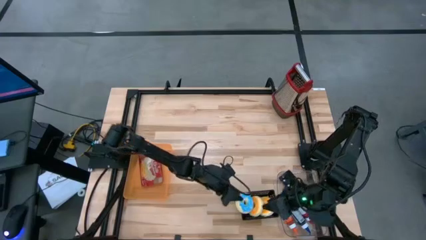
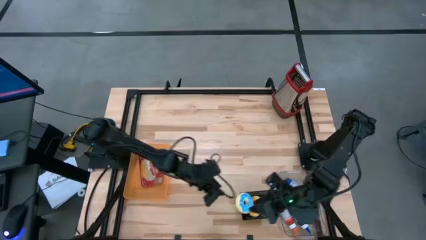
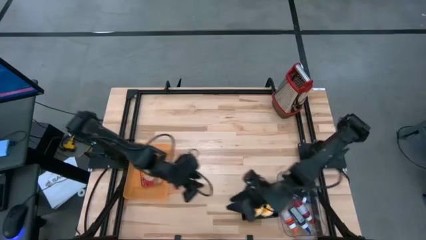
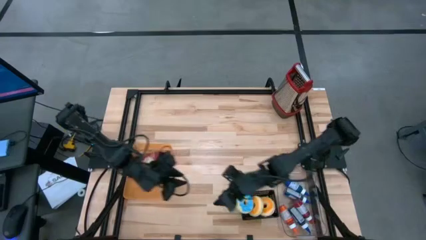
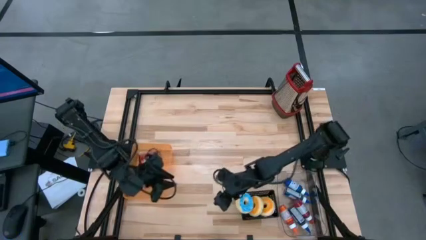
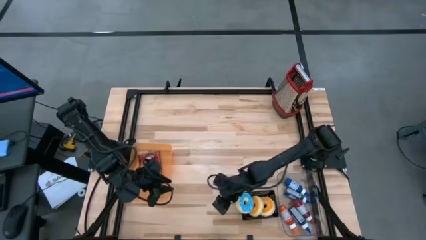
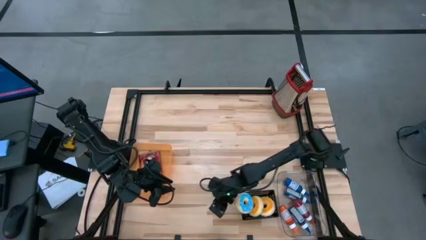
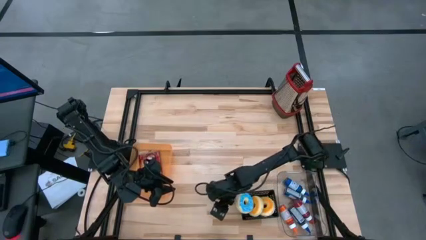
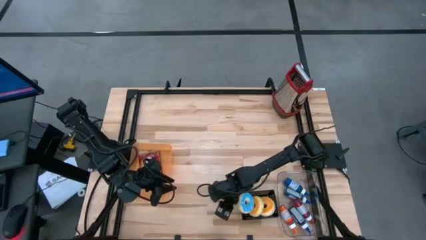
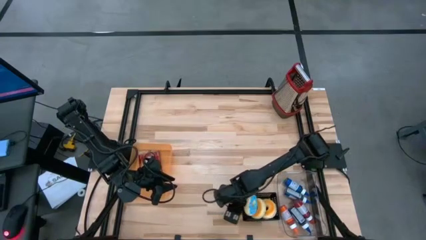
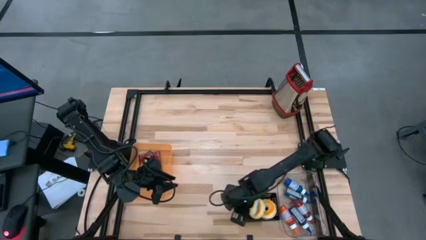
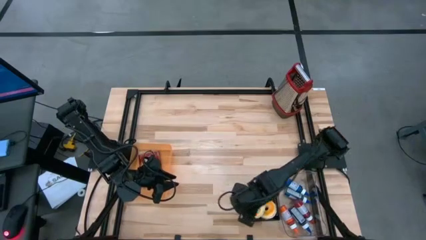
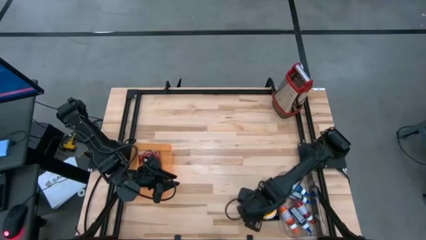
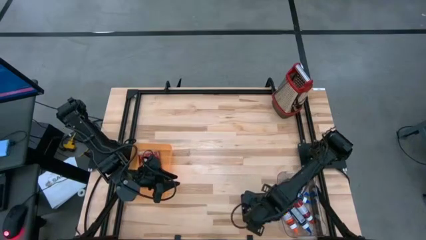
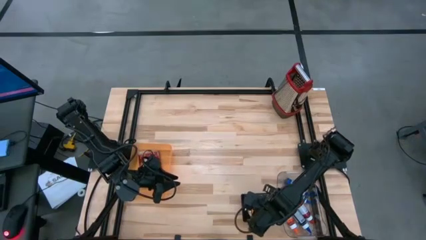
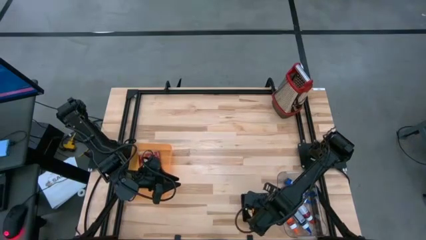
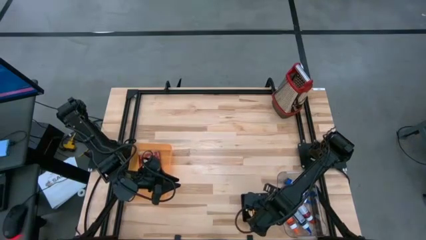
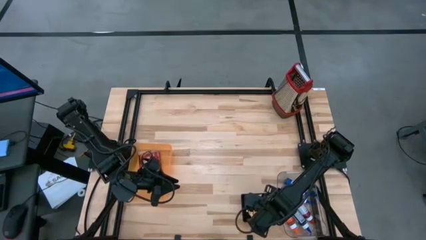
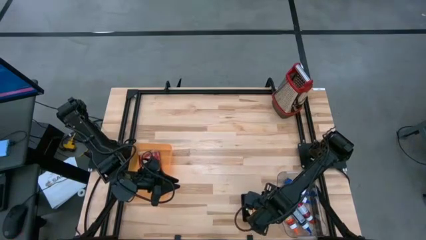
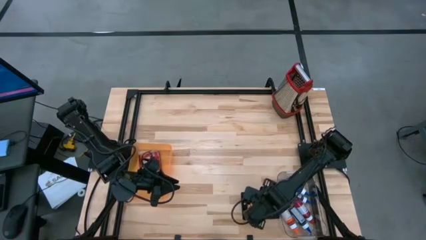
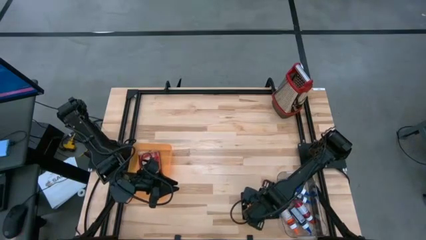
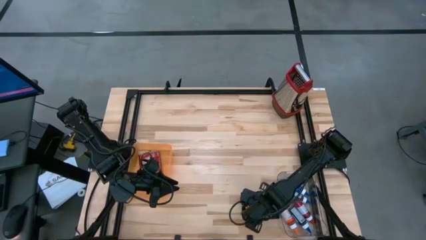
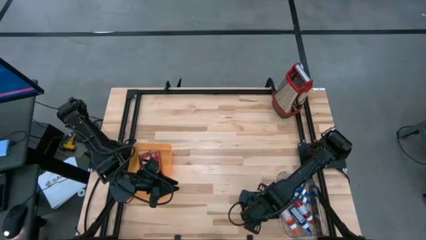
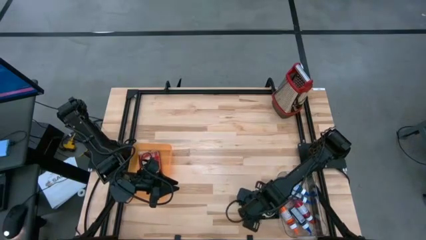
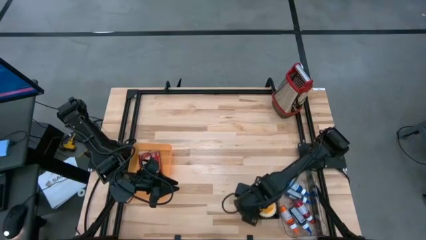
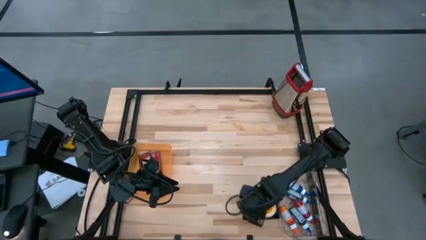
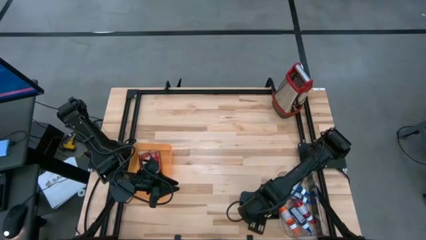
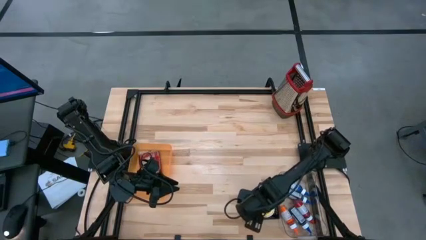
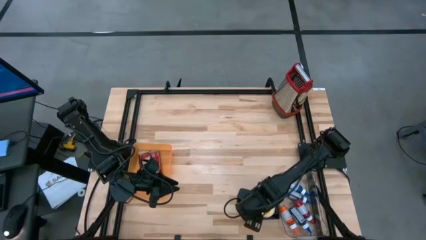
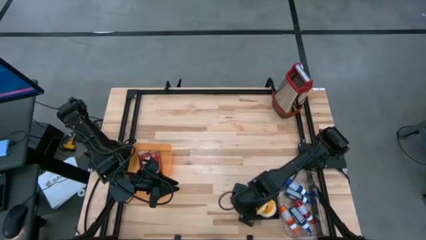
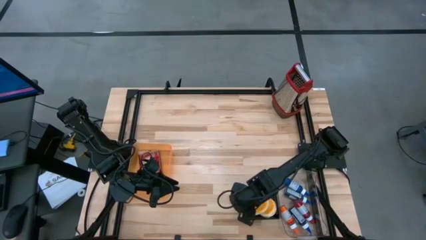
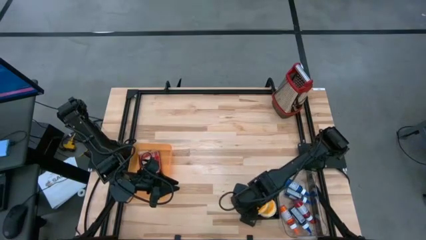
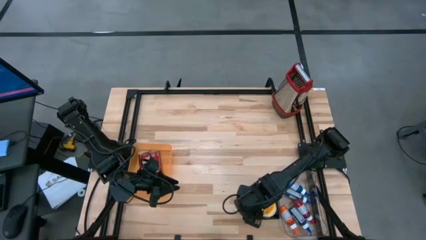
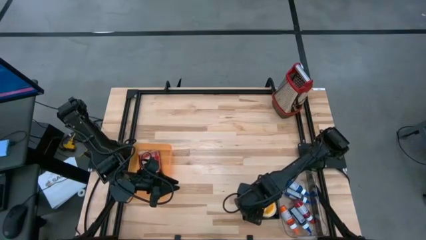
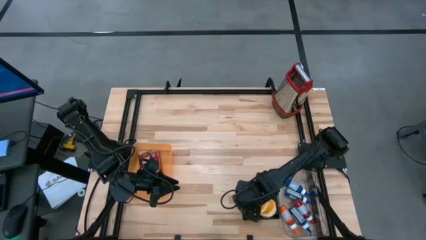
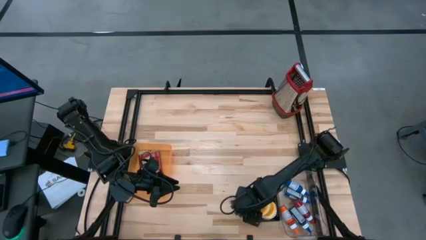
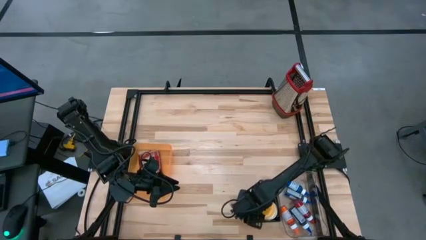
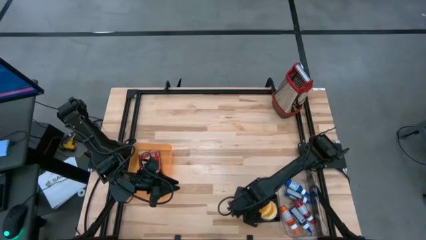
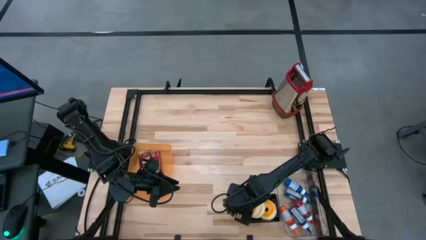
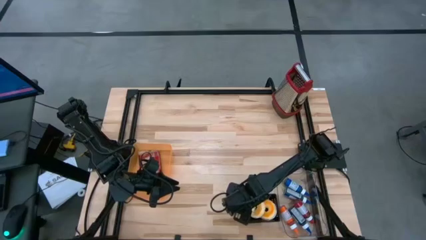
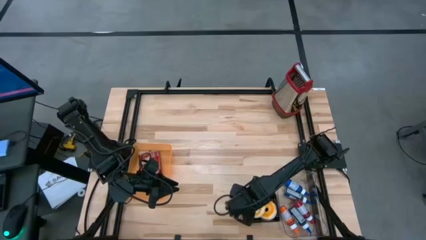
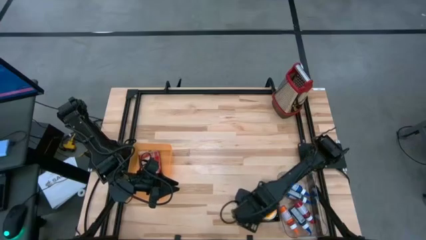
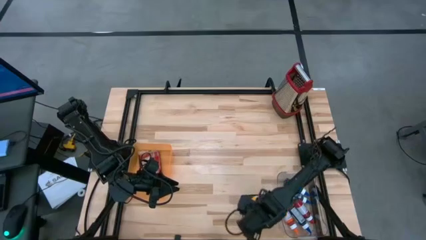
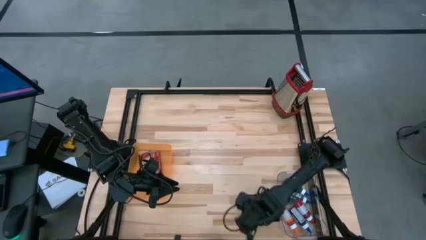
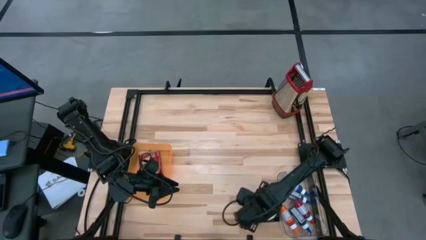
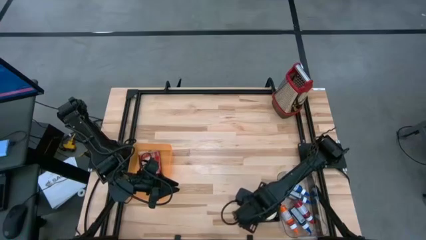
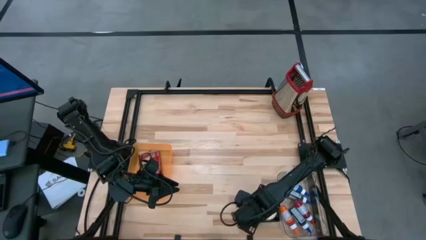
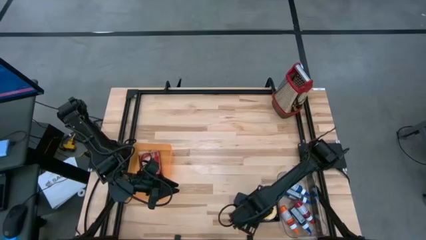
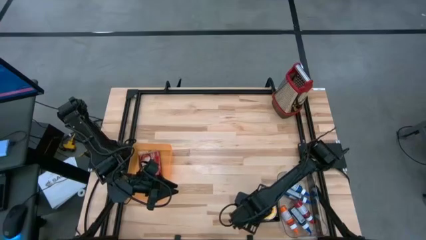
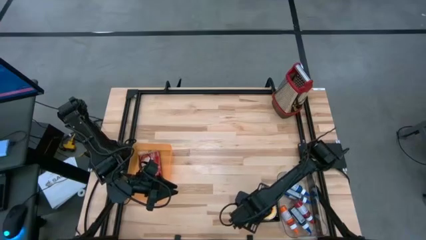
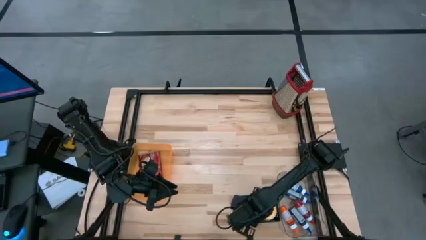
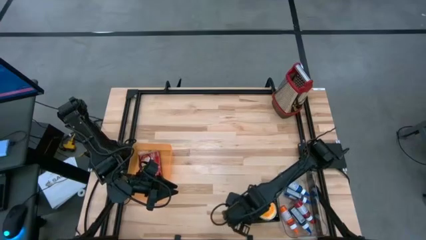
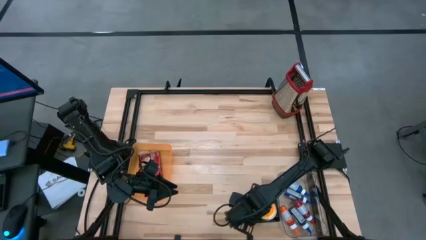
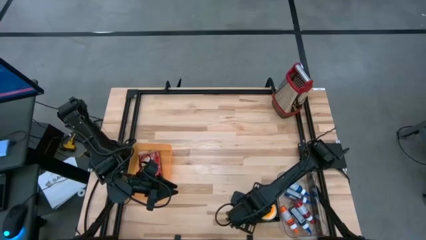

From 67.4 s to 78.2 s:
Task: Pick & Place Food Item
Put the blue donut into the black bin

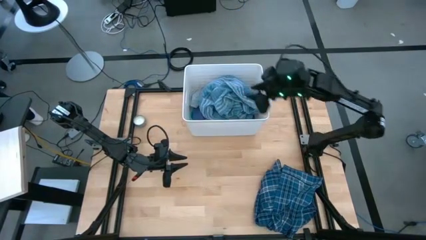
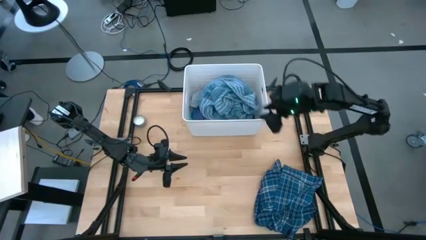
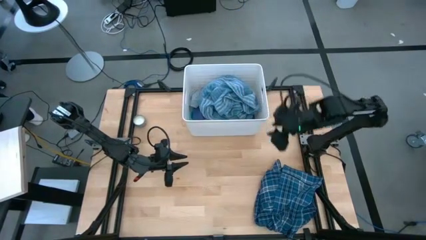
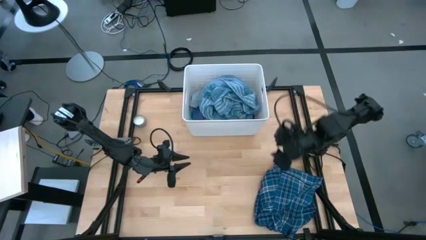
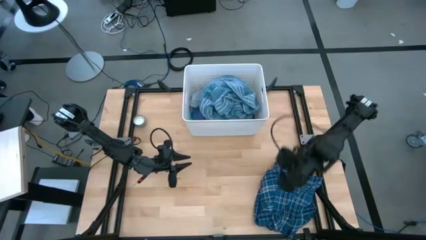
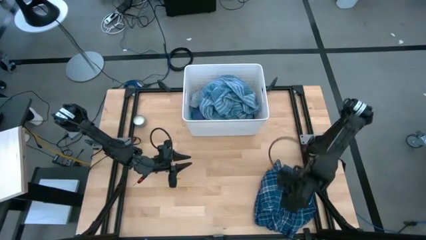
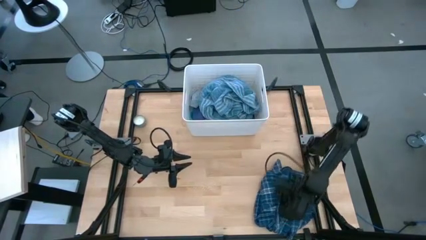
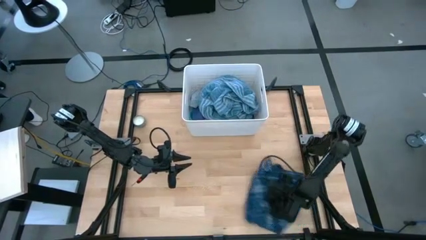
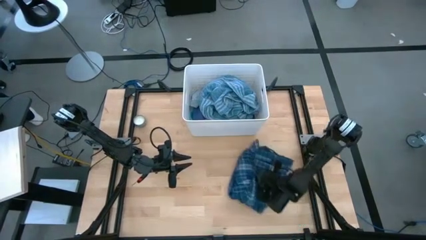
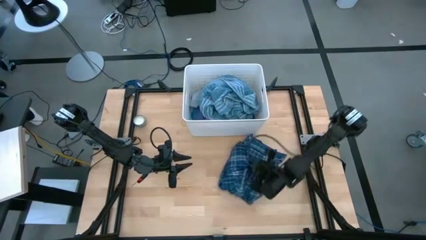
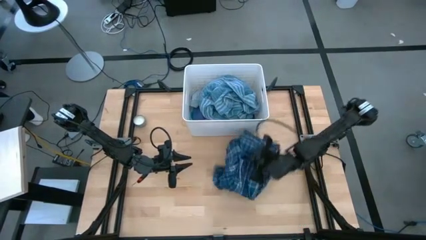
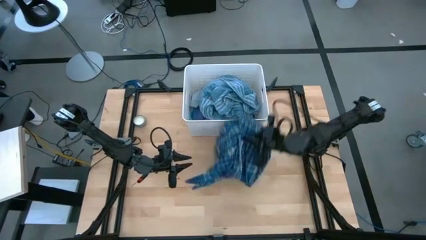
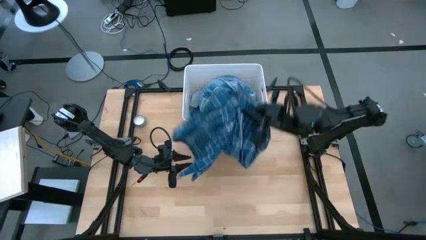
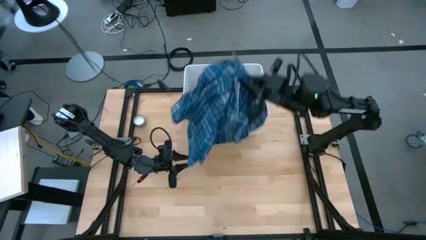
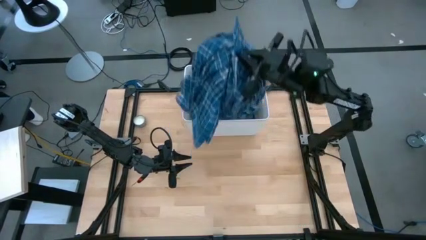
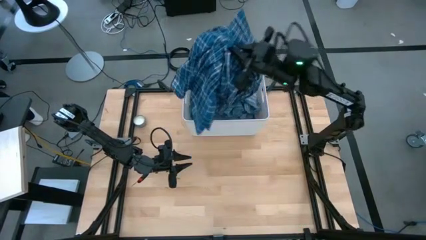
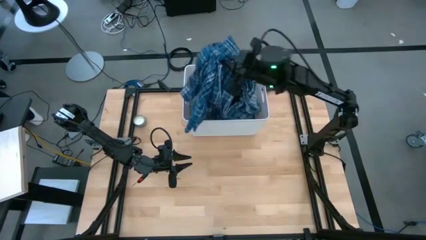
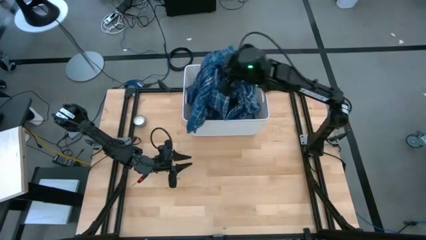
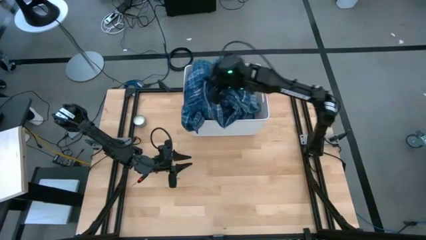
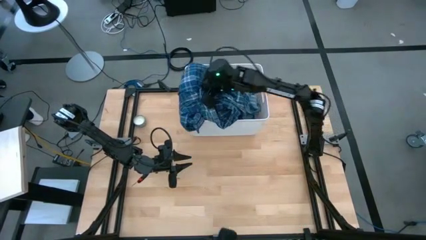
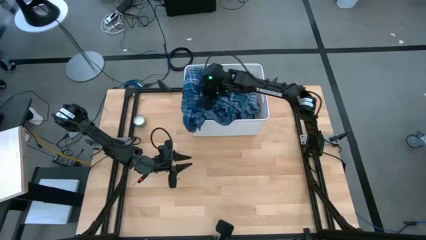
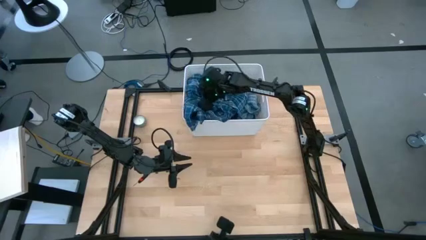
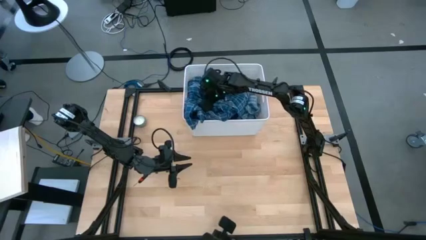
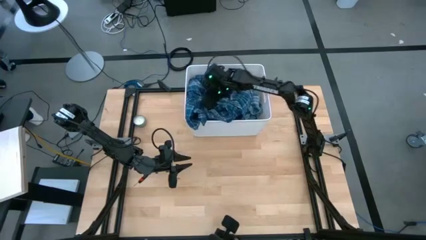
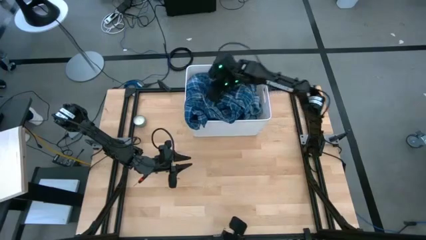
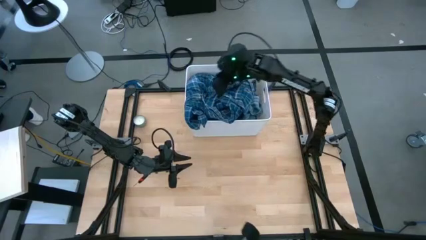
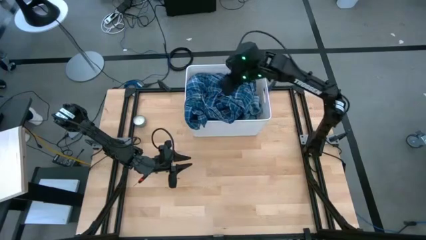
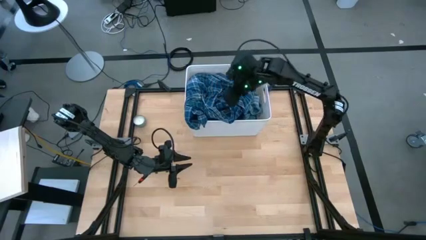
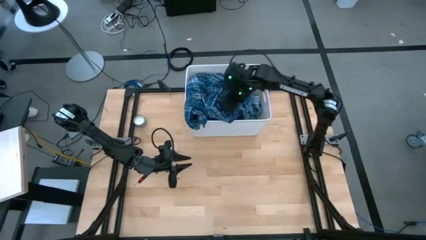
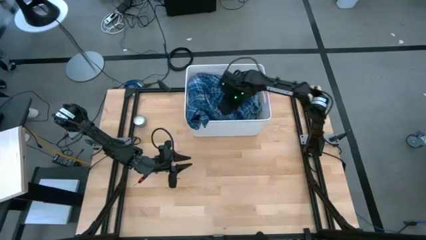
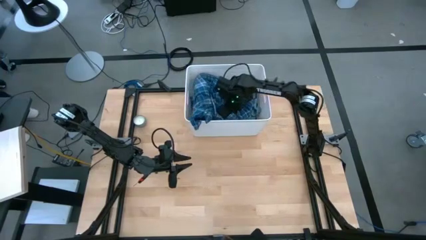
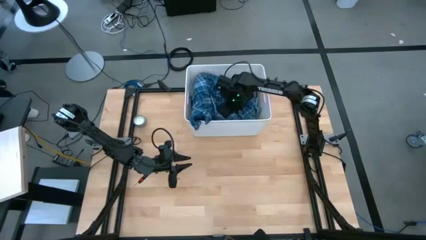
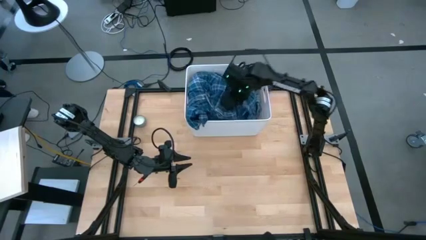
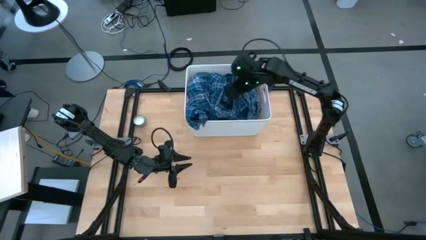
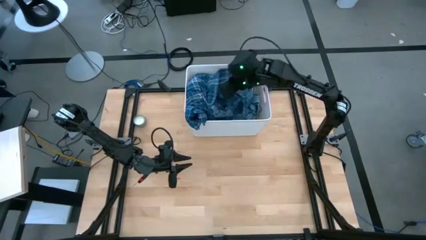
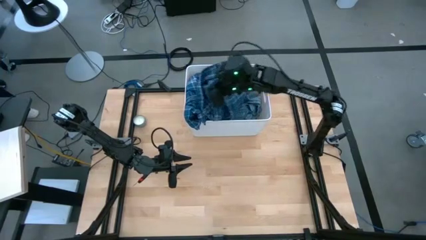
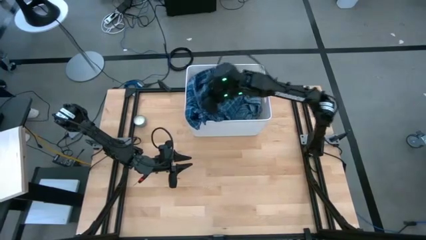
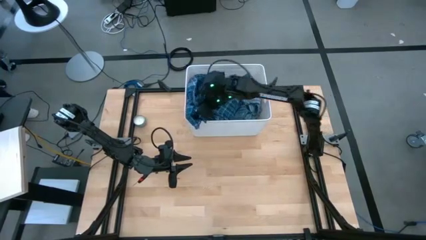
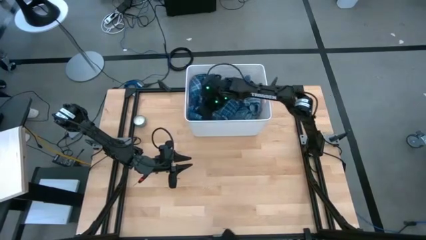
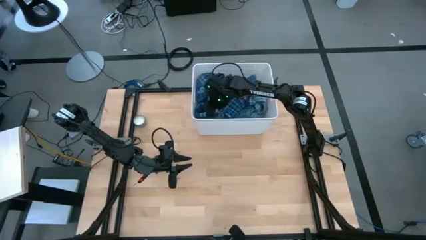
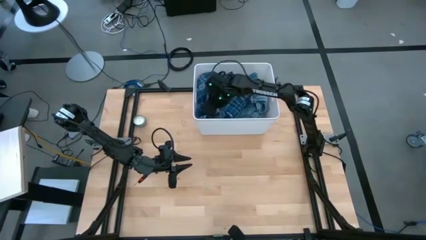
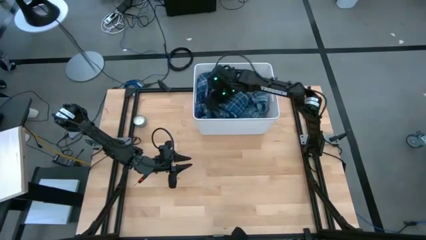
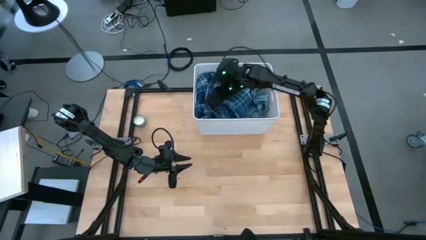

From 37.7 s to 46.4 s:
Task: Sort clothes
Put the blue striped polo into the white laundry organizer
